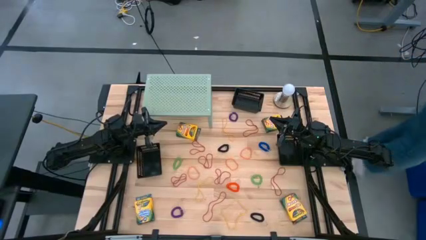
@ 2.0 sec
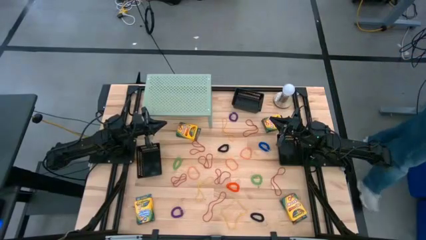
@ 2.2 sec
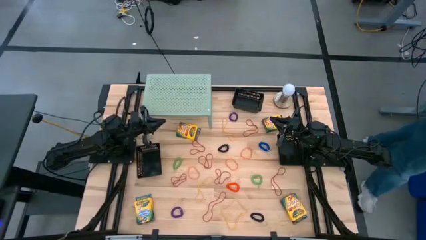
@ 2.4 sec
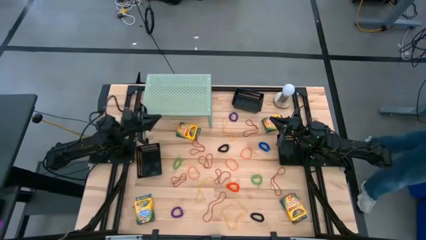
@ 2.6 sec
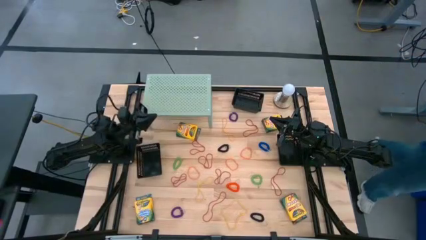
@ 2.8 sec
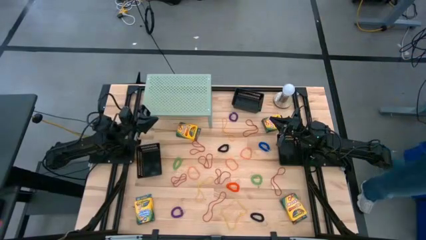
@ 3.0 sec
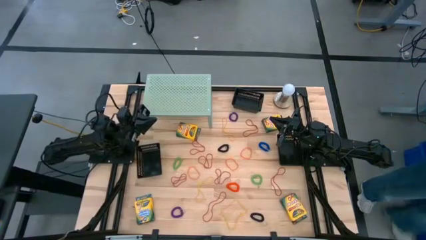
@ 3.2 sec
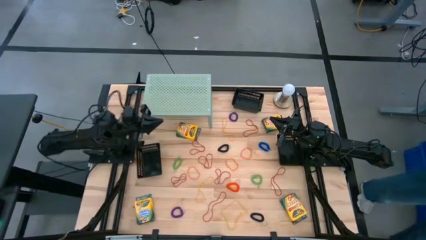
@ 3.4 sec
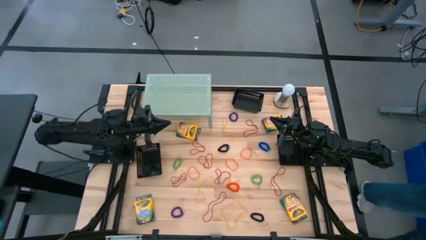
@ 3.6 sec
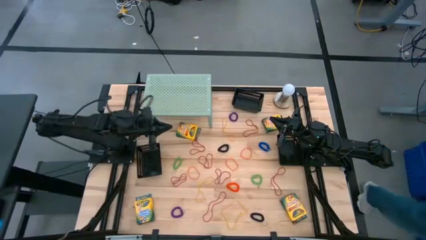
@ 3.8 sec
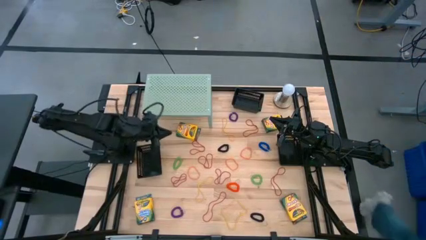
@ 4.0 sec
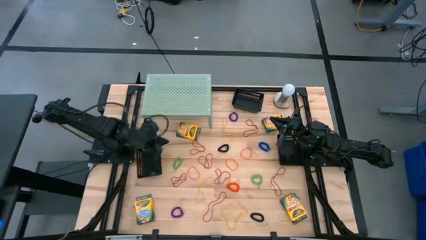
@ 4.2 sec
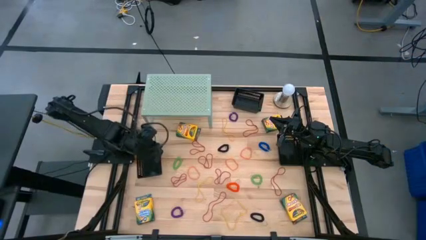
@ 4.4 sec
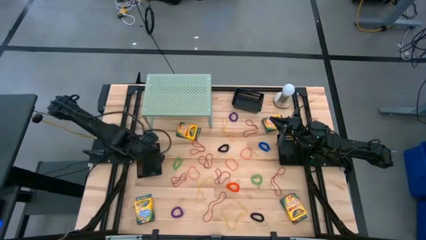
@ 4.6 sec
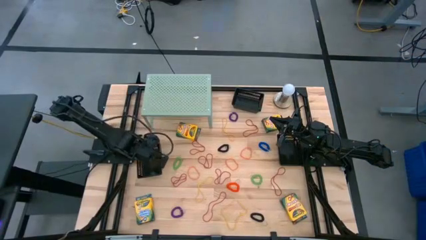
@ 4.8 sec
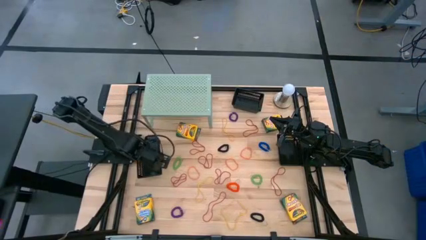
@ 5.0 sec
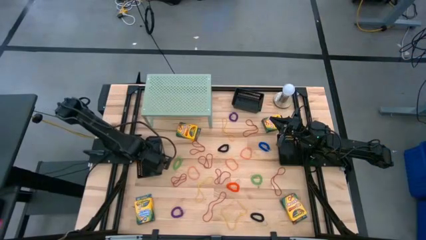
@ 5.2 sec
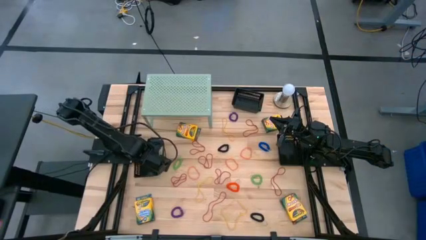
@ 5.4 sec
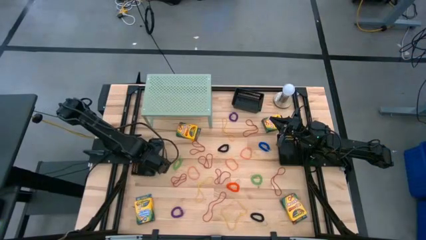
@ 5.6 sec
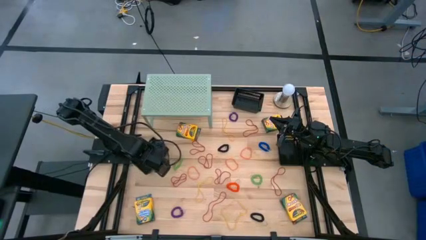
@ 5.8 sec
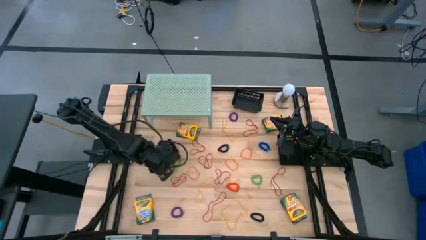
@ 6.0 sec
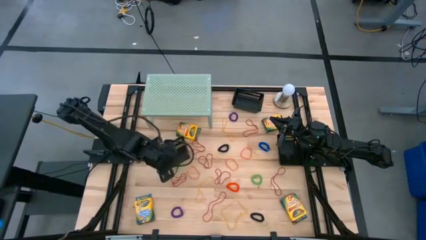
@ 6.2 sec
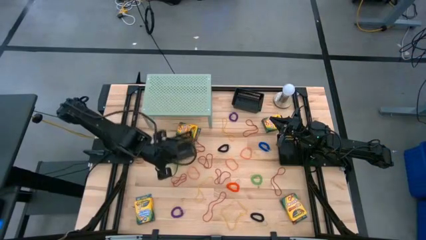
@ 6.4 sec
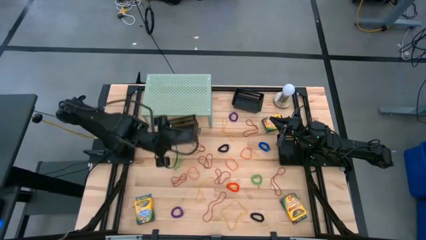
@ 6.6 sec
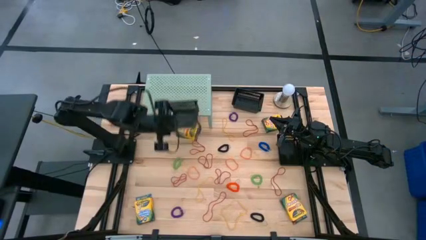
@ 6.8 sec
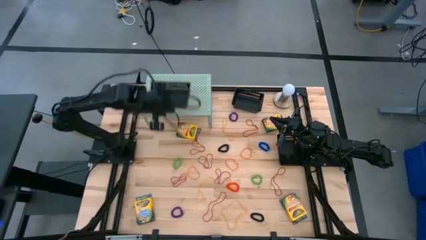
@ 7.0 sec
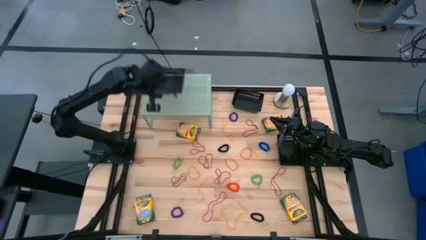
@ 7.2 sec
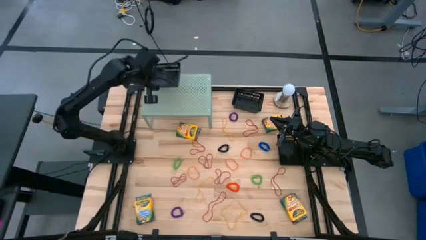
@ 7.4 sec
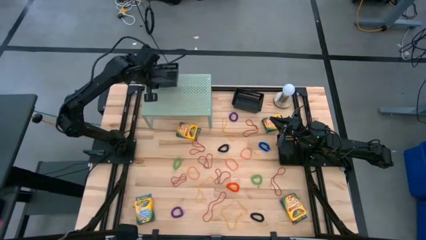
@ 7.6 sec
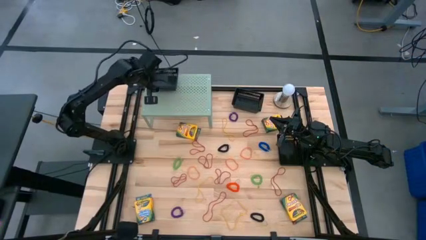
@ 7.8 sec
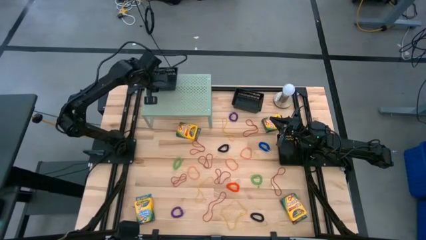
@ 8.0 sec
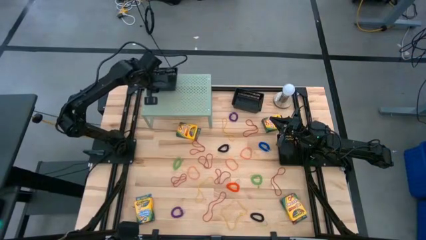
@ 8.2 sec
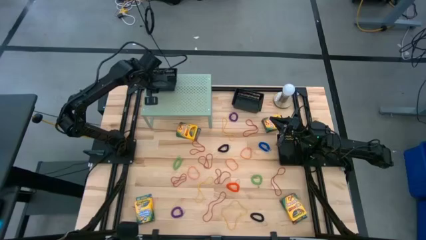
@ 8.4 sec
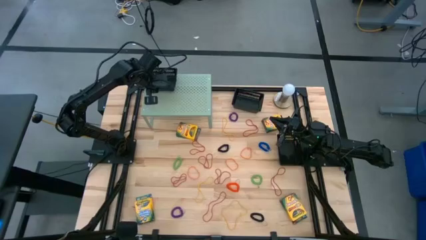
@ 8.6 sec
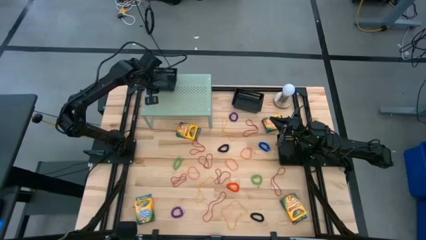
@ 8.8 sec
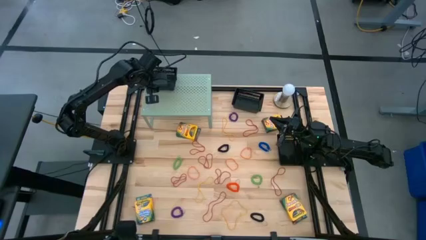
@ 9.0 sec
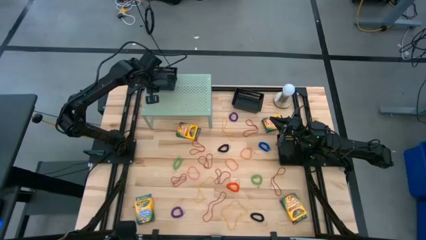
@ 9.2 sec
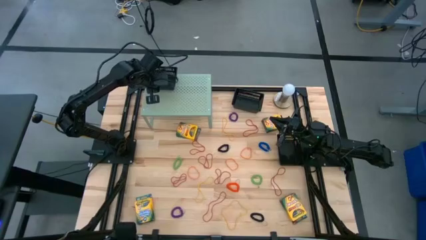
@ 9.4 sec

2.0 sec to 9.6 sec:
Task: Pick & Place Office Desk Supplies
Put the left black bin on the shelf

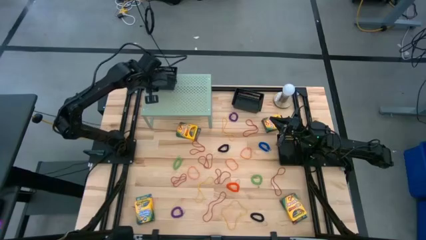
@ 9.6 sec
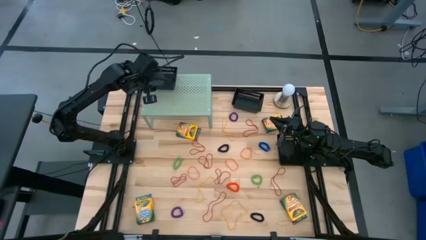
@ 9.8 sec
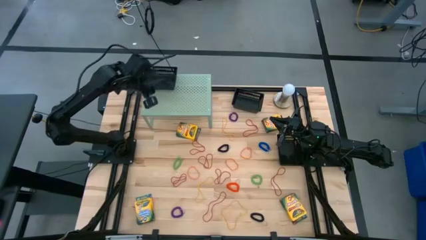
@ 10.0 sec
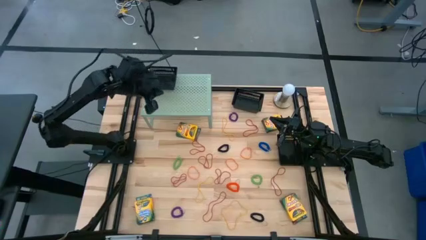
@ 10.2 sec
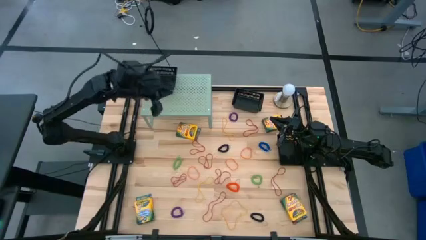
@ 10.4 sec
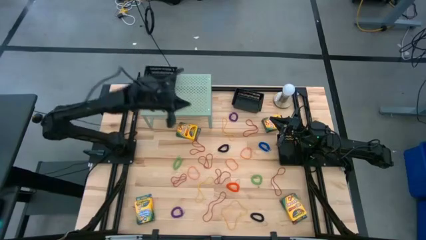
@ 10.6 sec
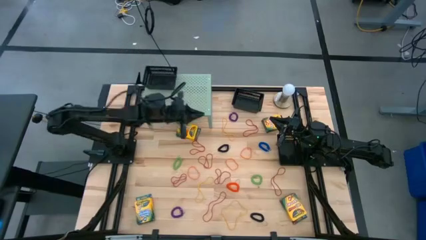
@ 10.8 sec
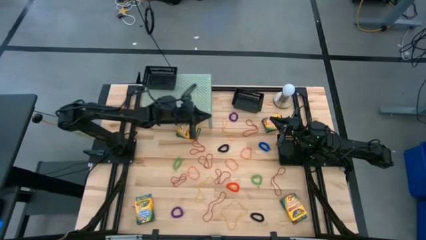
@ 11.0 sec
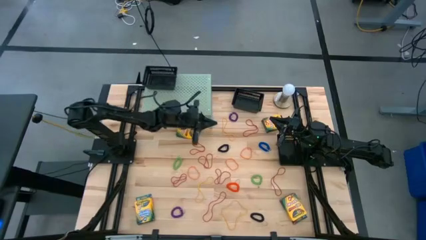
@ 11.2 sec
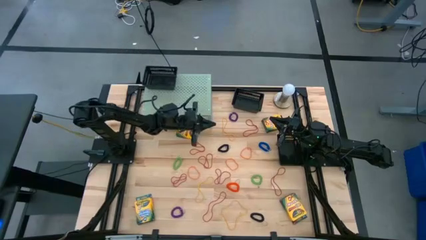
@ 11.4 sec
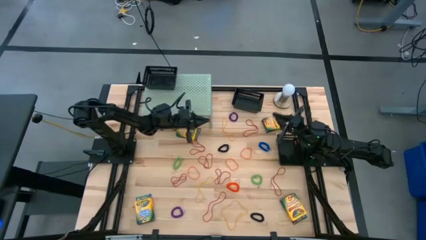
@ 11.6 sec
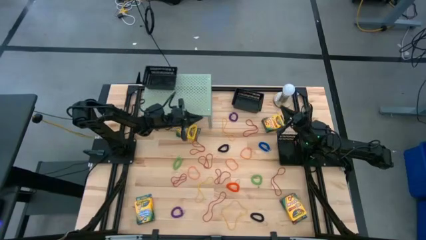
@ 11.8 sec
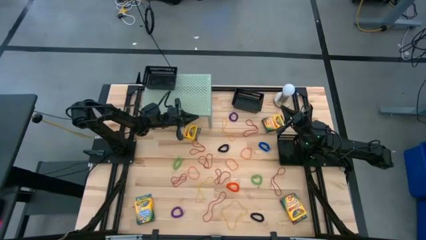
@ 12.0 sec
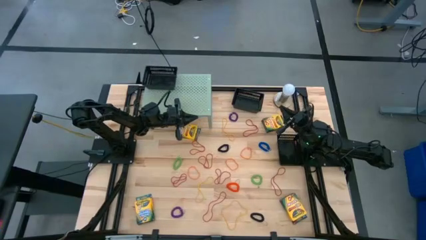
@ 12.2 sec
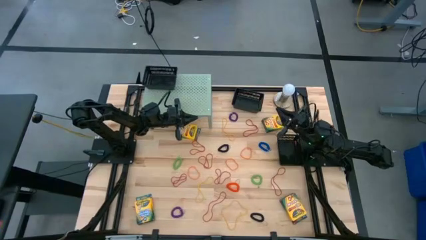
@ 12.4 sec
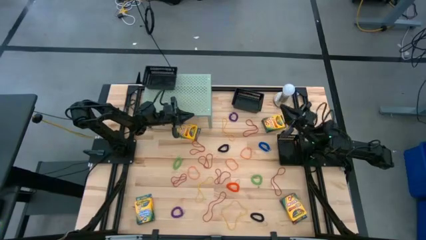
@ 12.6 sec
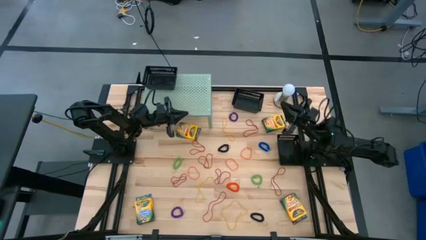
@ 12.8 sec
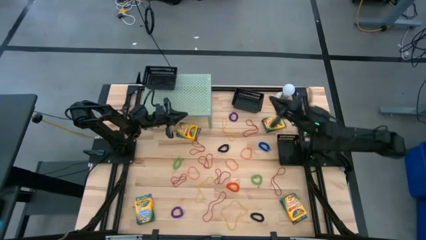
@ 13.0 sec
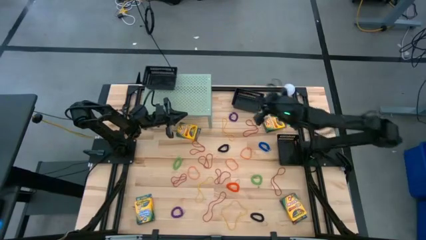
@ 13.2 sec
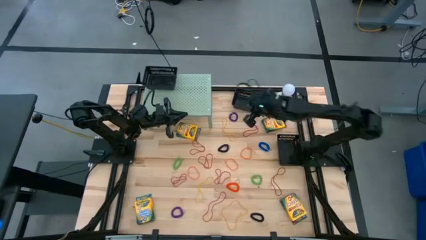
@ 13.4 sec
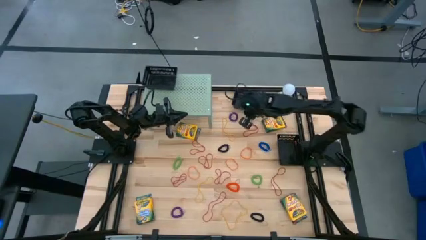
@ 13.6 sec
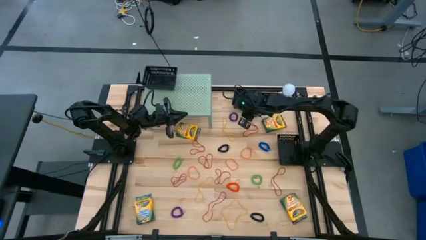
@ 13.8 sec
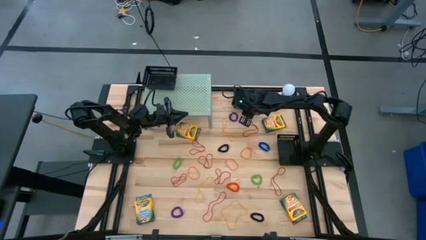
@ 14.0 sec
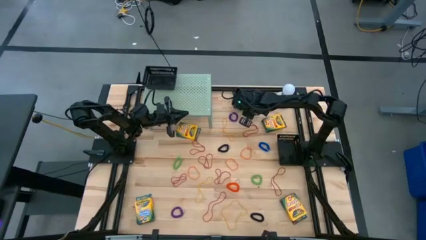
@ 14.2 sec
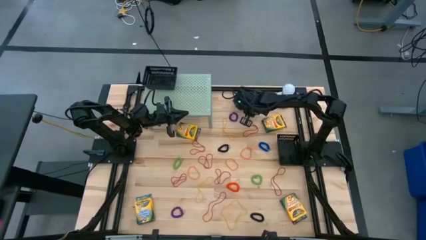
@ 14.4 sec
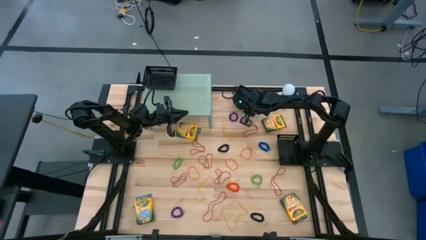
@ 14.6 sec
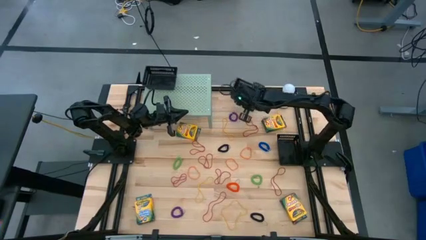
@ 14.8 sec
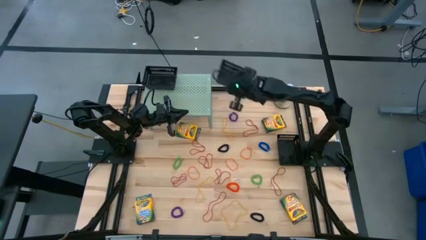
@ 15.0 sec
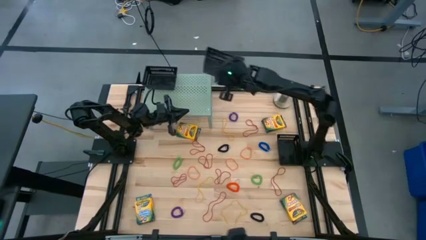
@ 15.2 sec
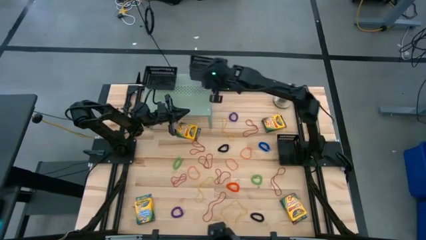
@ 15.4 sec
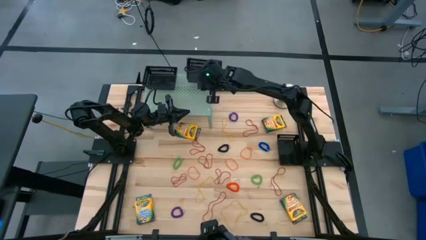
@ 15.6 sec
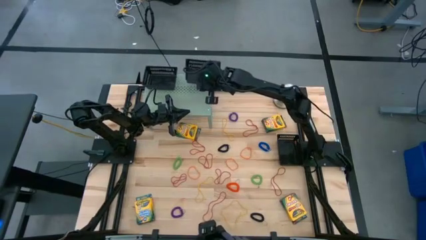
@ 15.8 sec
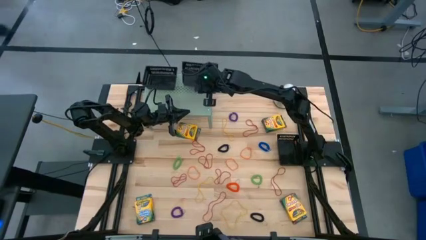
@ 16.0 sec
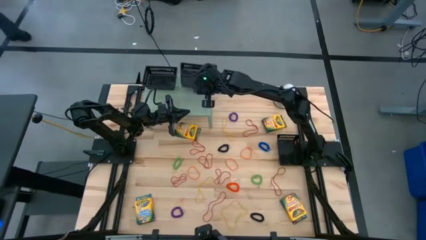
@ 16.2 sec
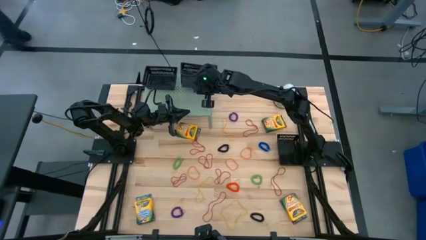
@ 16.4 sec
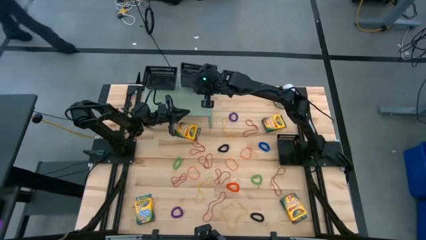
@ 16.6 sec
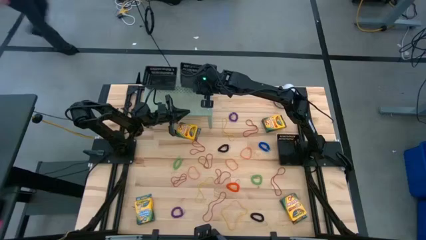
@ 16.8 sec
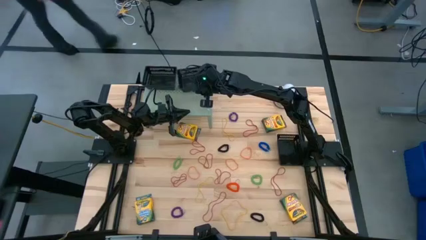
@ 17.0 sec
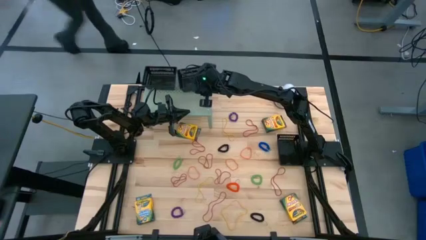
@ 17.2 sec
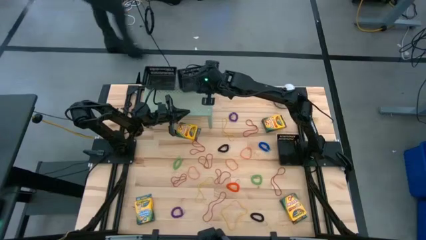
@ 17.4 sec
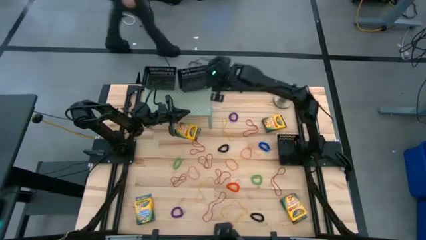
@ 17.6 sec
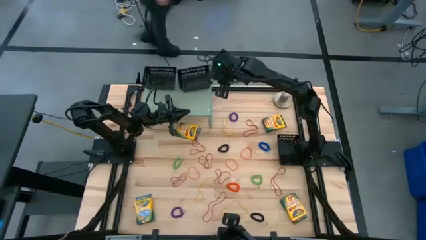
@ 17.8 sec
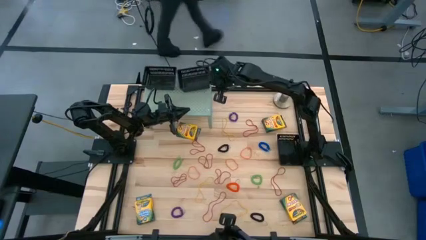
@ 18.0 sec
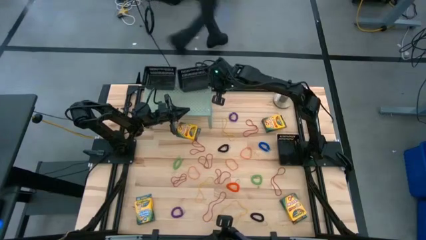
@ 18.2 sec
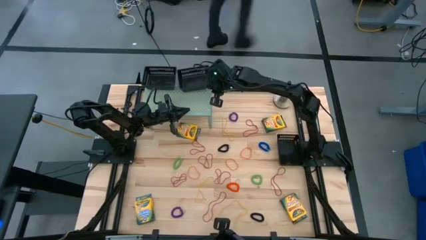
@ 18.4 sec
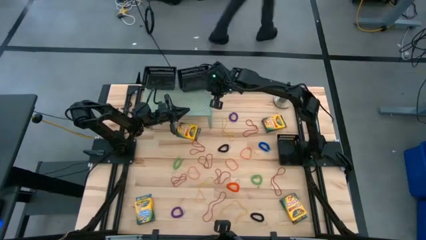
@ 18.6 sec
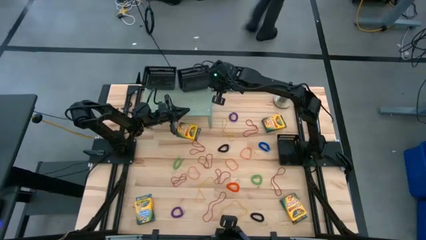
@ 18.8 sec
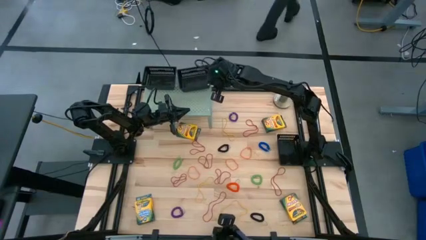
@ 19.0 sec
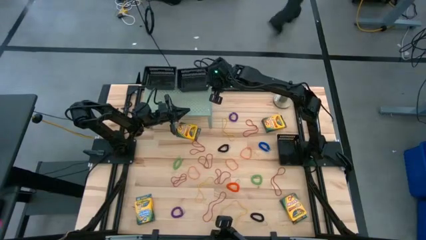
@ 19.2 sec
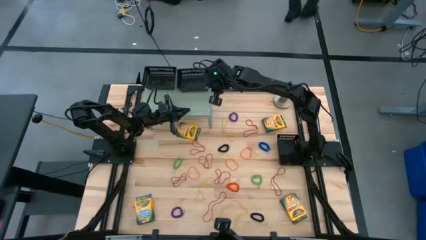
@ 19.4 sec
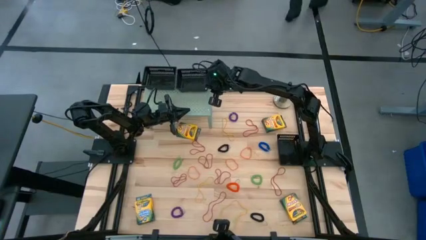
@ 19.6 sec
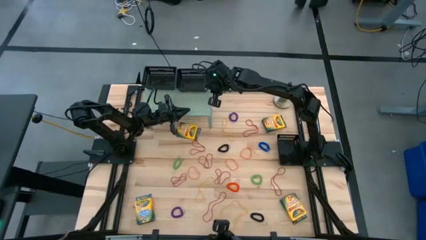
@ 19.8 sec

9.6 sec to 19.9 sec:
Put the top black bin on the shelf
